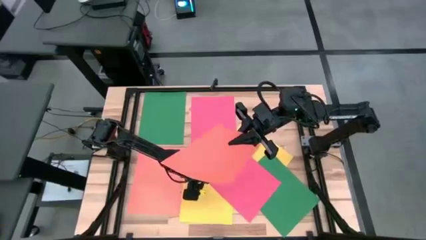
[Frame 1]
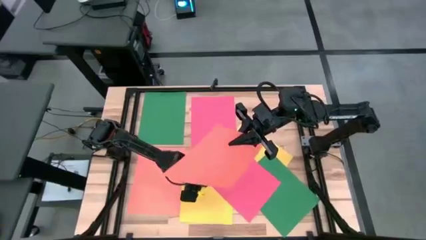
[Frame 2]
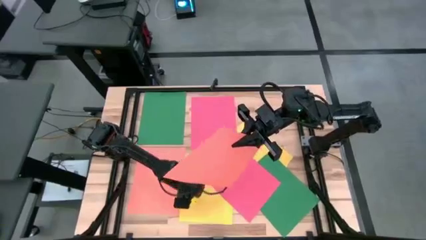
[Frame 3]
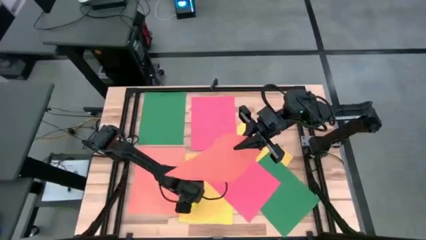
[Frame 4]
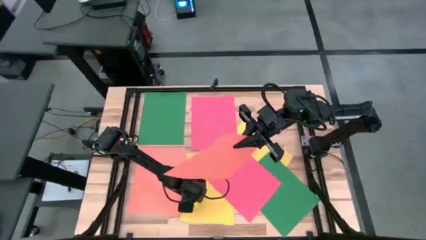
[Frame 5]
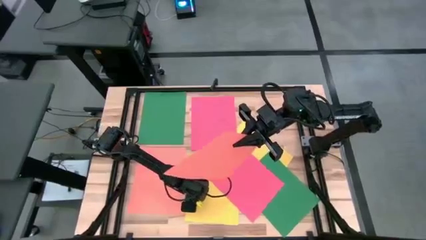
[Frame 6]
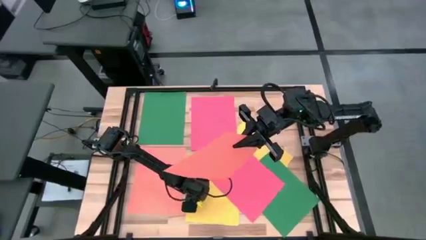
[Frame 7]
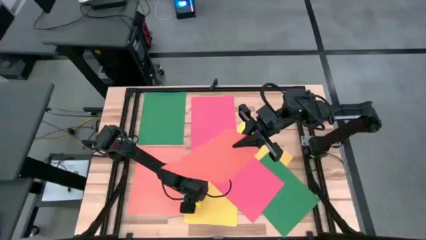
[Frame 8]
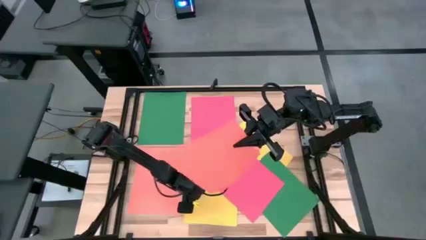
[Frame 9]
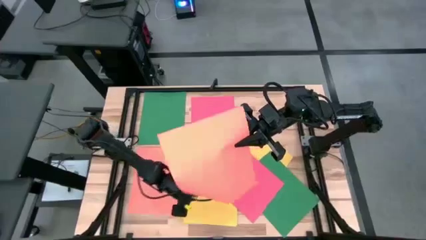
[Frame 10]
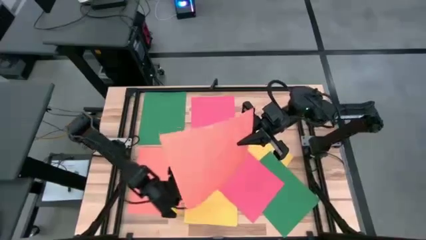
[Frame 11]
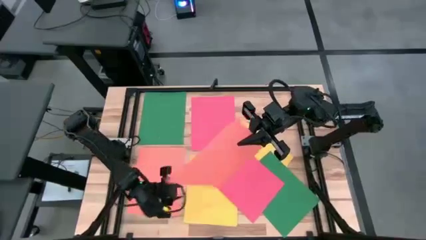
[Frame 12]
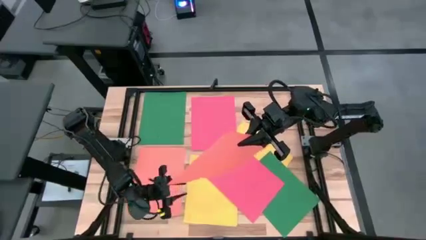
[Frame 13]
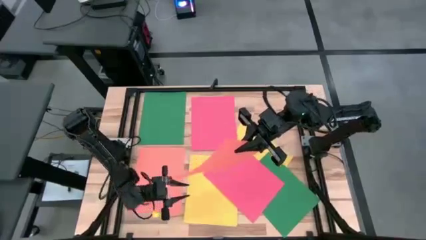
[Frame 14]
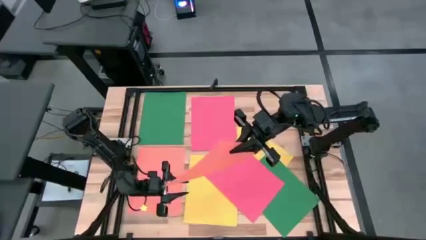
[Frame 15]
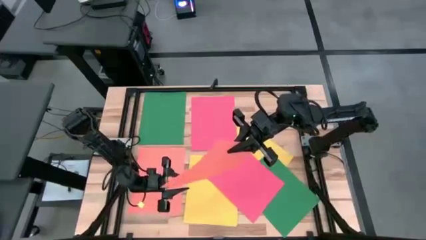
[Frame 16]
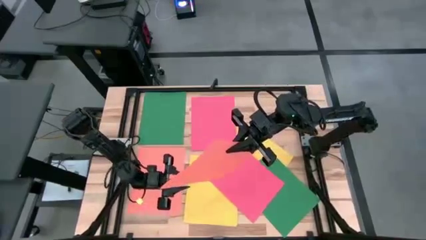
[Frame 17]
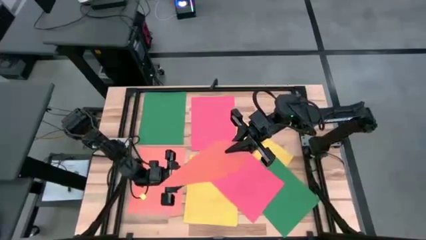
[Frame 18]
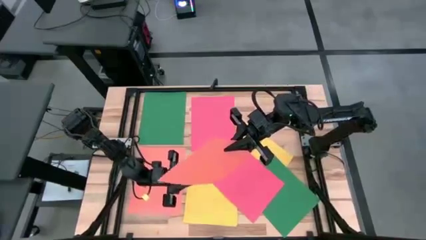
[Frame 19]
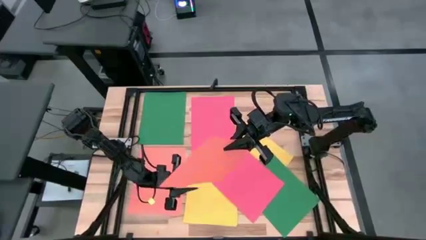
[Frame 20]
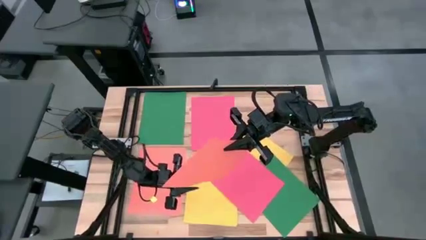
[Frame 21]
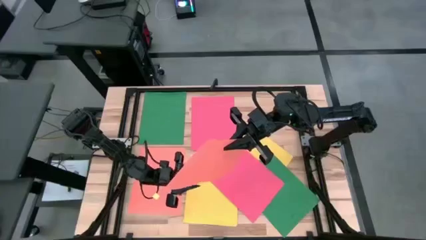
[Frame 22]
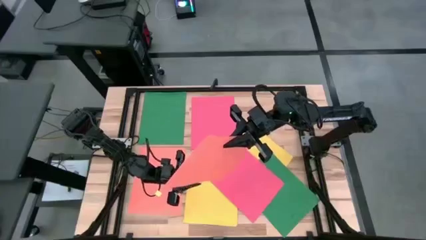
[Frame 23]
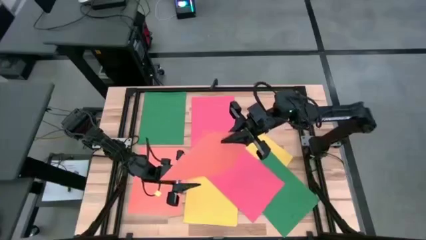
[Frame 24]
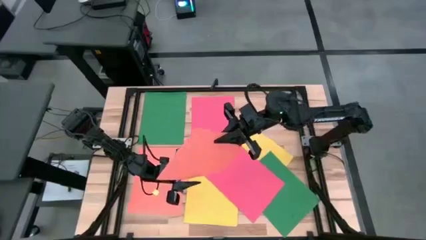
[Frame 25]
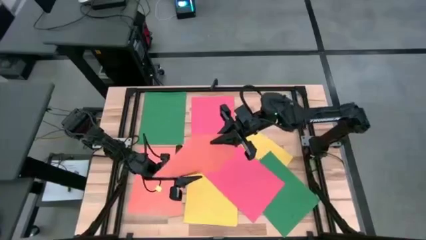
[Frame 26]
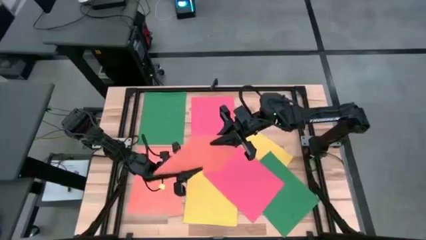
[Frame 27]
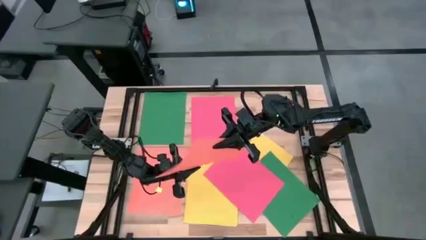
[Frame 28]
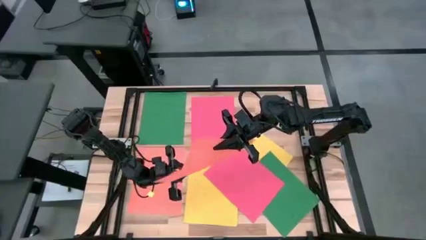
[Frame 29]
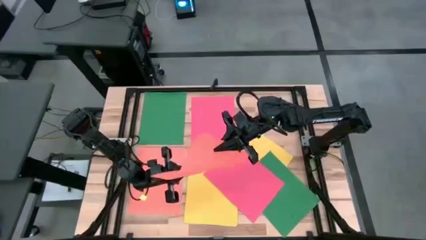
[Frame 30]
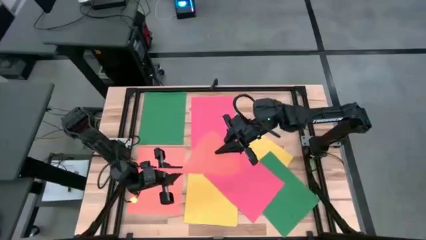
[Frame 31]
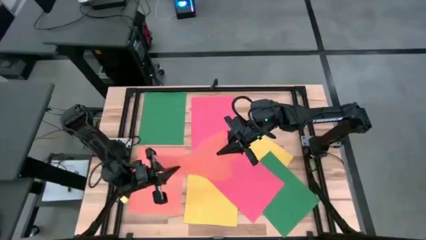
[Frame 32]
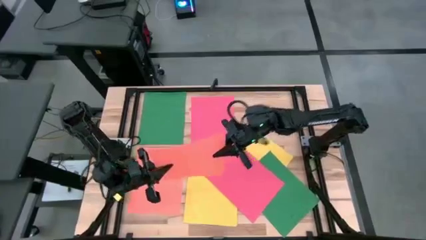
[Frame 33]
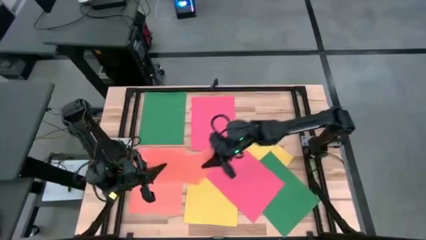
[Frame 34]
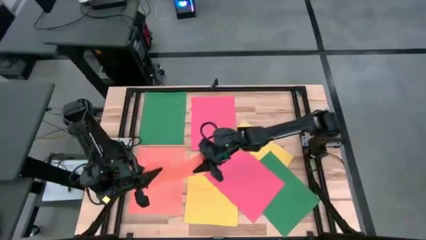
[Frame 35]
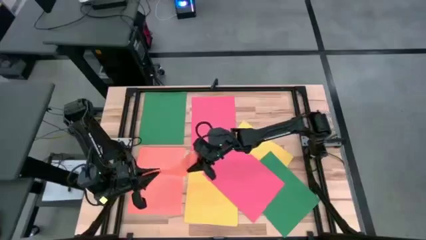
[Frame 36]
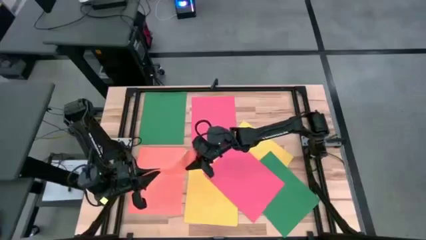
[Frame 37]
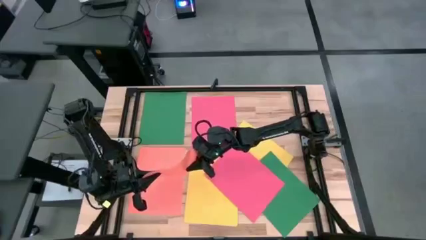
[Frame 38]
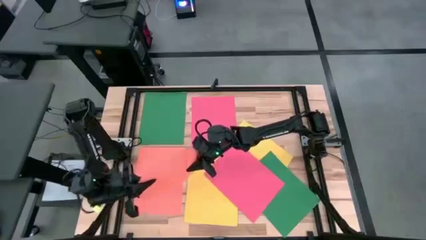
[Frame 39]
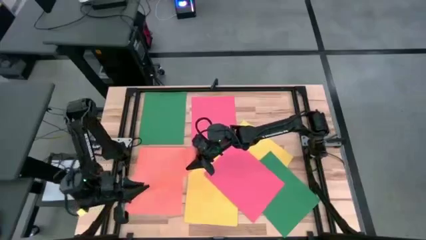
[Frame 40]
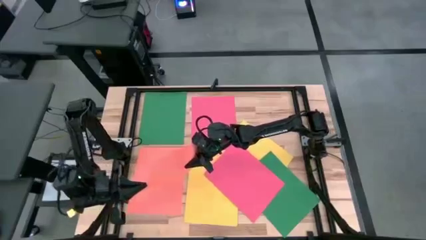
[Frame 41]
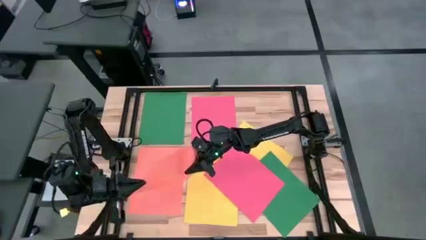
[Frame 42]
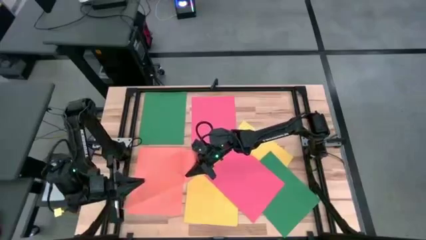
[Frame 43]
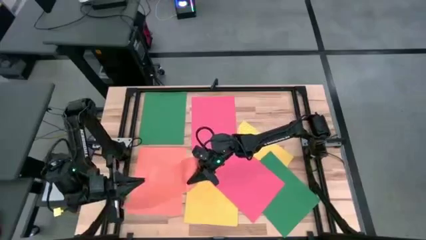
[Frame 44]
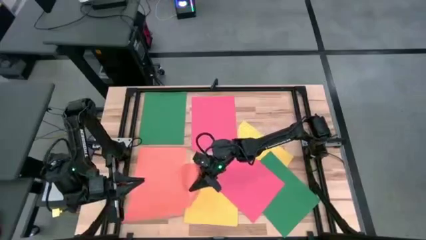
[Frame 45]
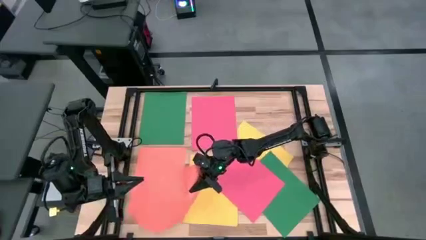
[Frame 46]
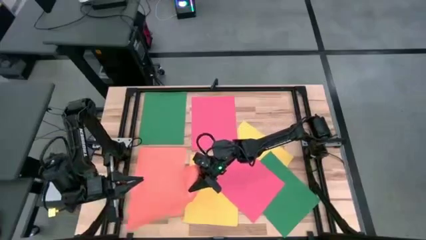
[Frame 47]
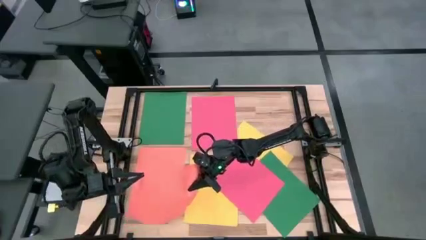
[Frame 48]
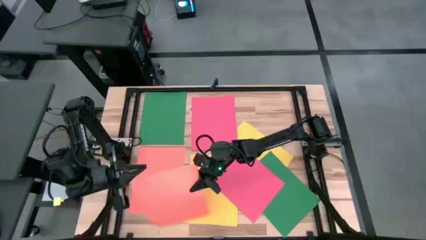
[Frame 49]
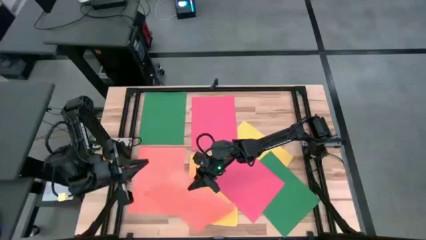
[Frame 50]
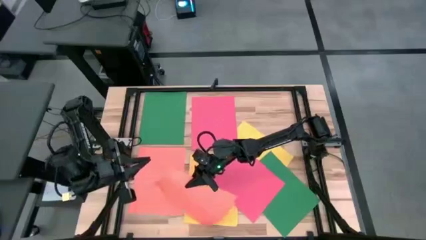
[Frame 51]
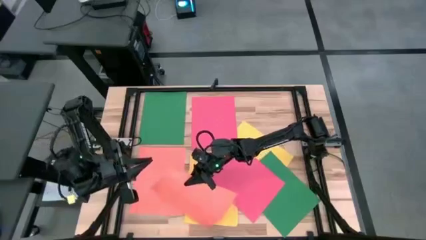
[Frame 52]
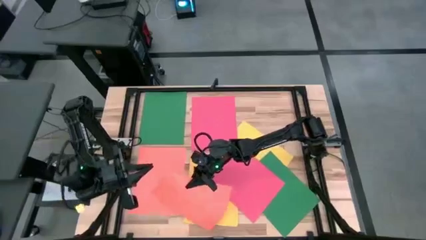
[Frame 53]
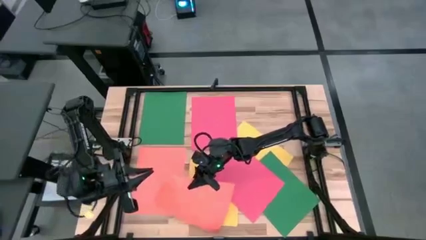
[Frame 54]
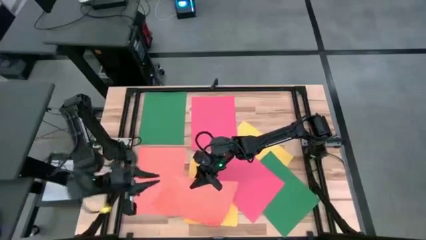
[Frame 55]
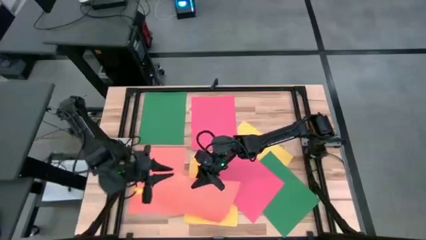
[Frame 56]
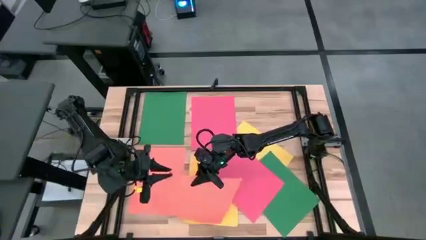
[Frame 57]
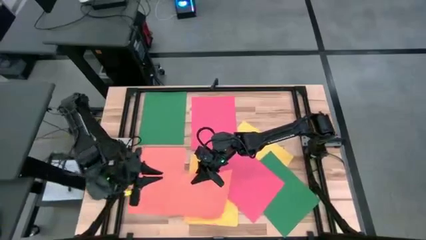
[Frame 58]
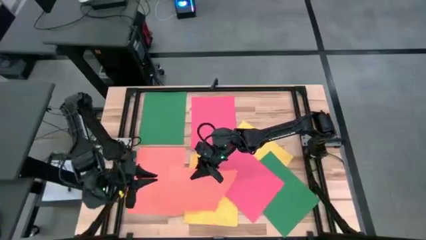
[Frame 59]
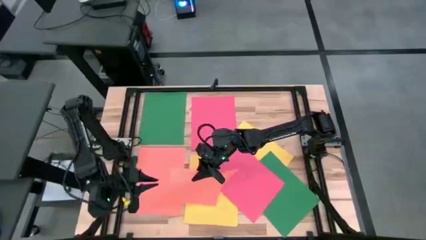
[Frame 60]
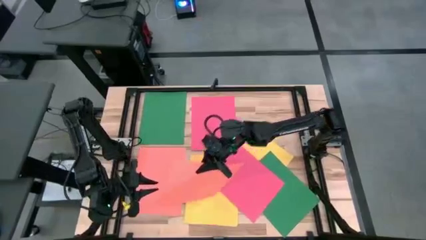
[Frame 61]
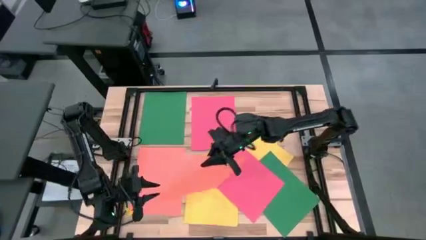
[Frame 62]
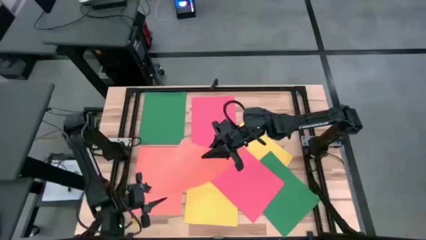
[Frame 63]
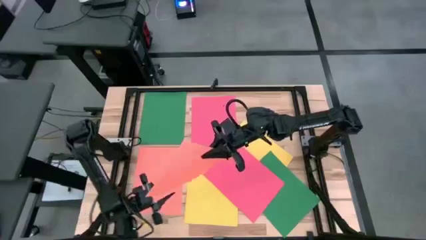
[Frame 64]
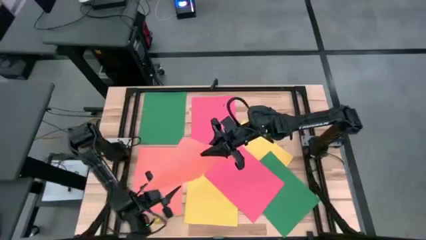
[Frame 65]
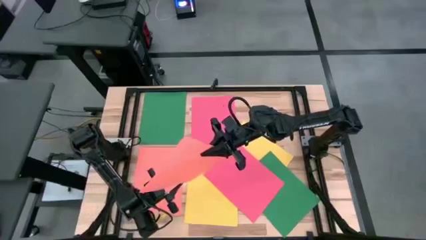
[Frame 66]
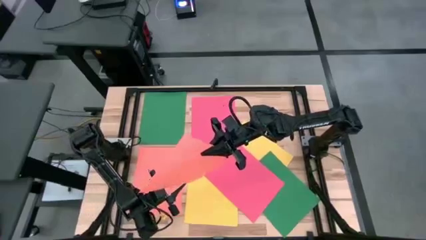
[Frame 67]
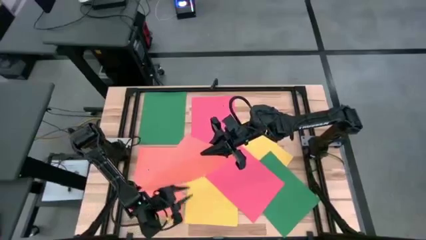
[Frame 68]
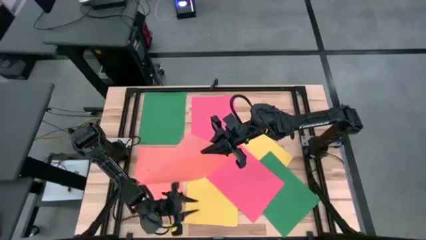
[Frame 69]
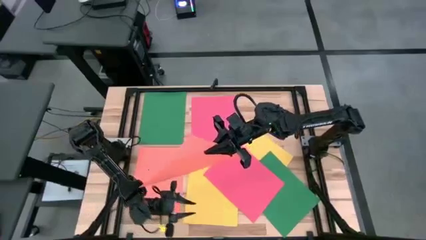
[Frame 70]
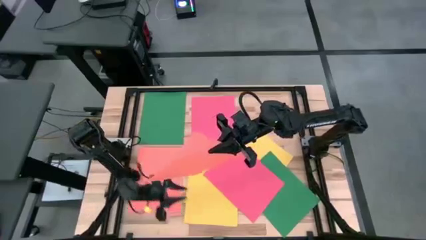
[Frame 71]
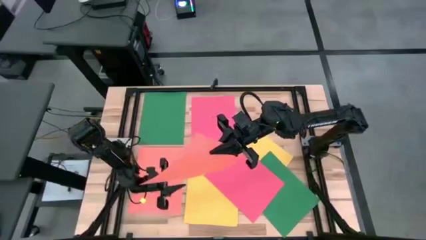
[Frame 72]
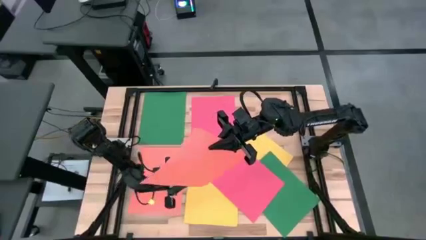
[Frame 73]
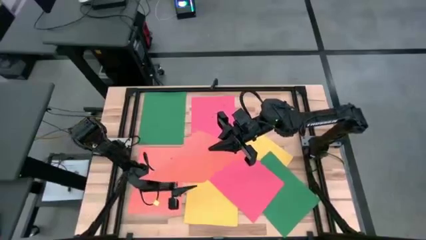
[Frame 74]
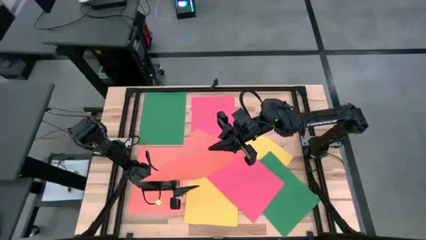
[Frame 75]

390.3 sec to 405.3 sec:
Task: Organize paper
Stack the orange paper on top of the orange paper
